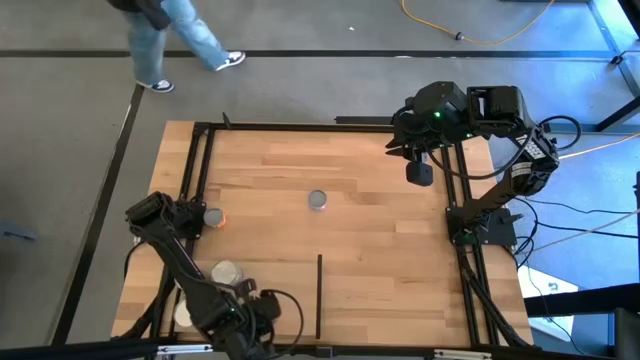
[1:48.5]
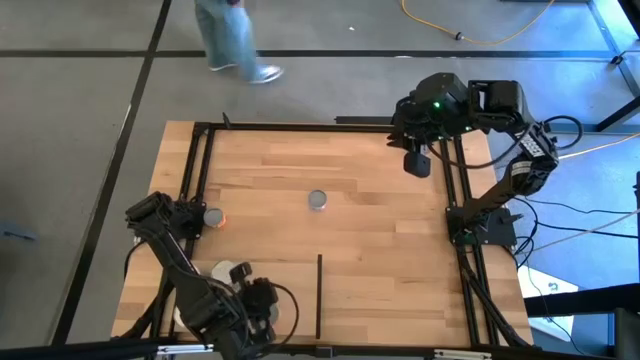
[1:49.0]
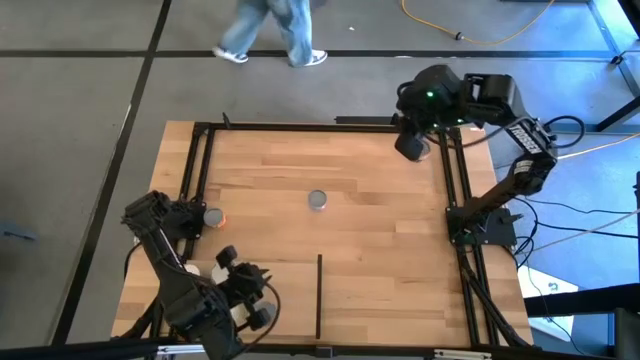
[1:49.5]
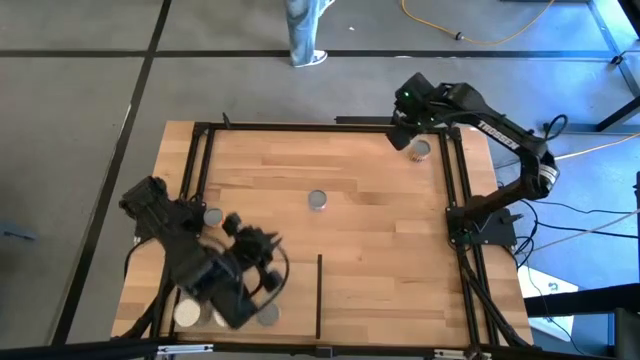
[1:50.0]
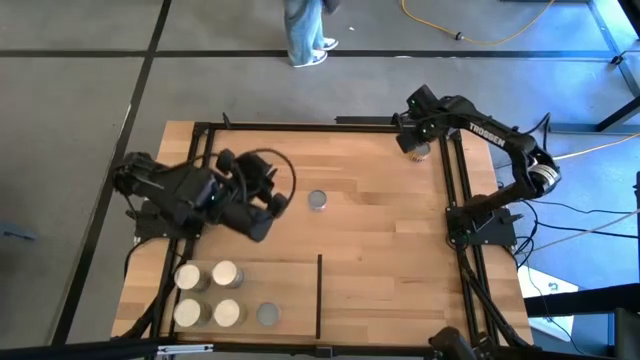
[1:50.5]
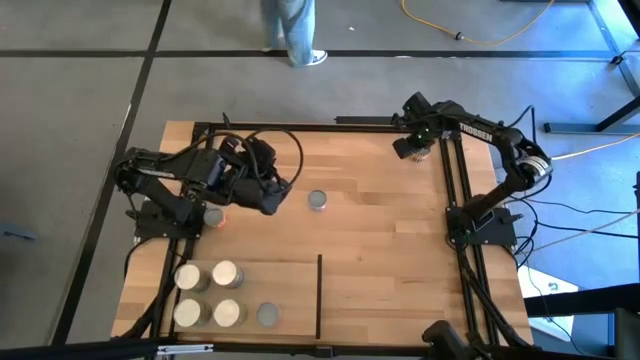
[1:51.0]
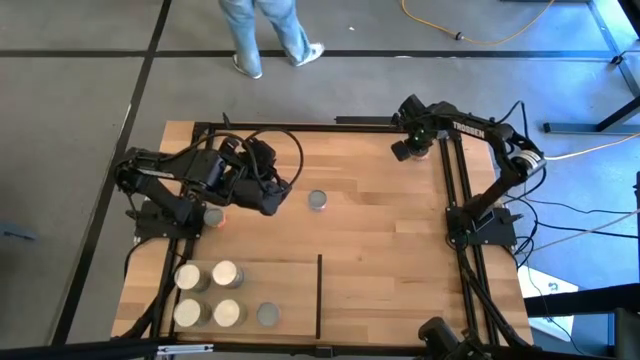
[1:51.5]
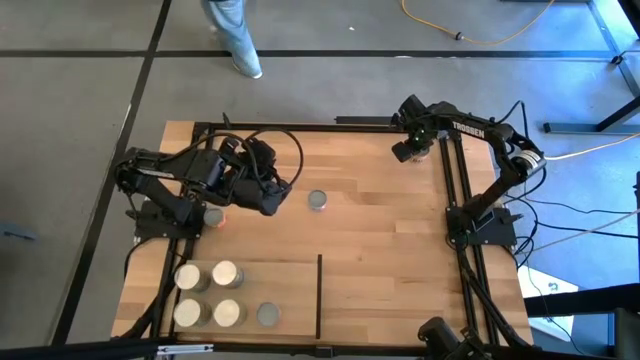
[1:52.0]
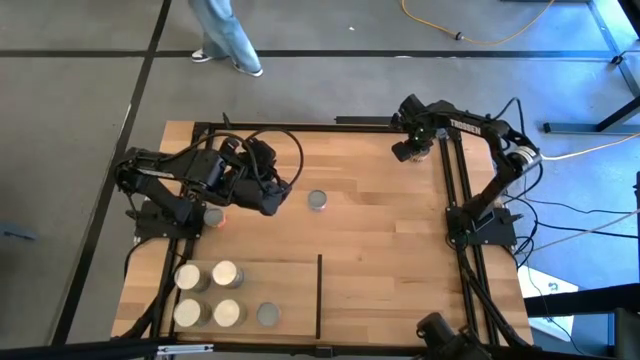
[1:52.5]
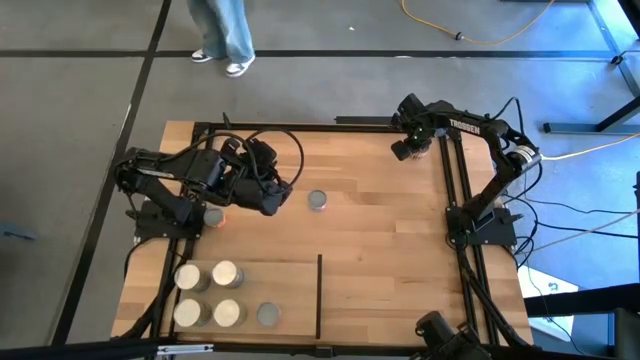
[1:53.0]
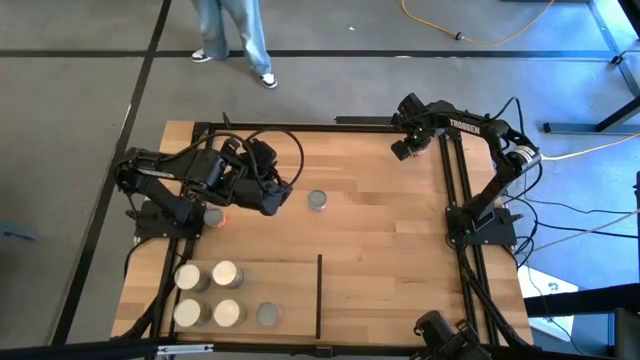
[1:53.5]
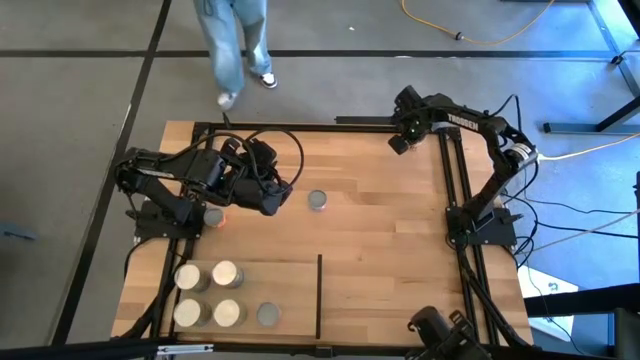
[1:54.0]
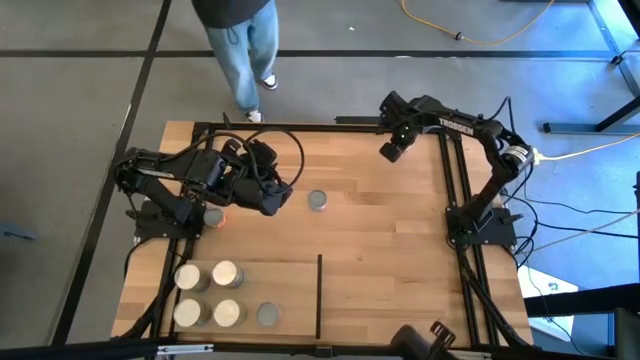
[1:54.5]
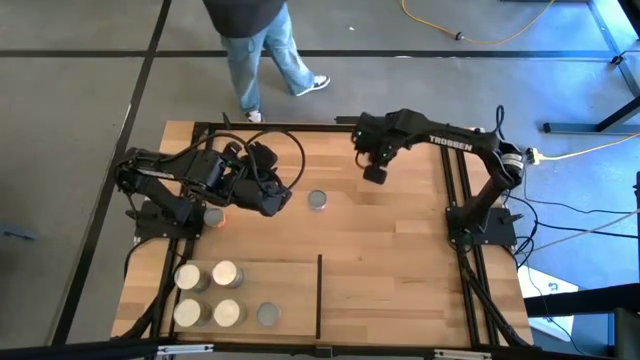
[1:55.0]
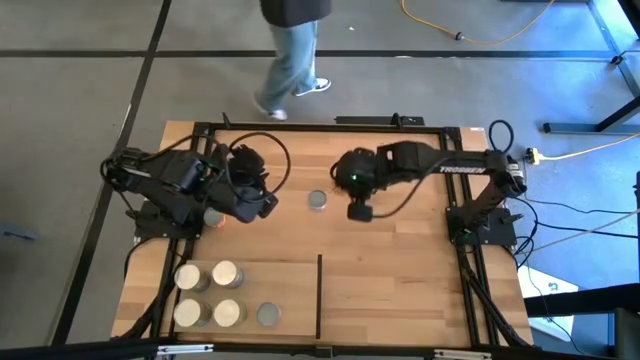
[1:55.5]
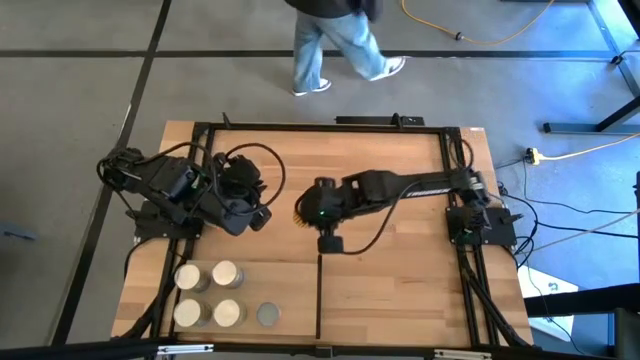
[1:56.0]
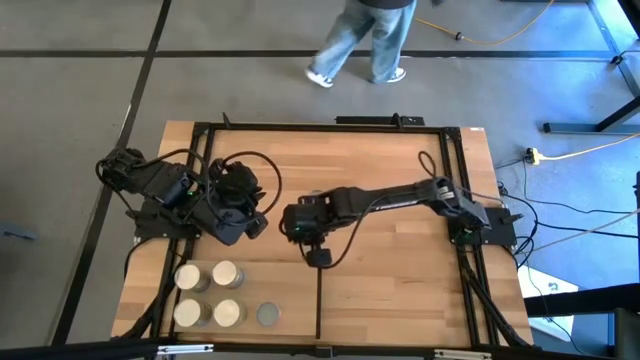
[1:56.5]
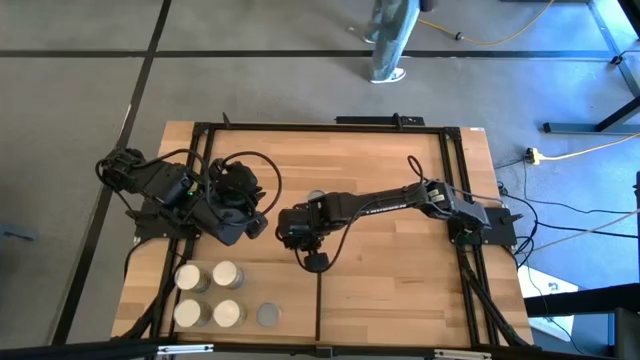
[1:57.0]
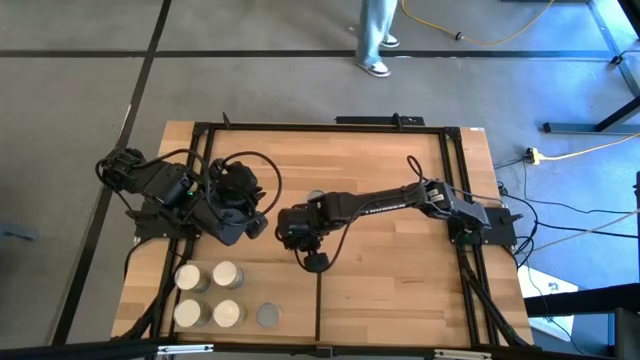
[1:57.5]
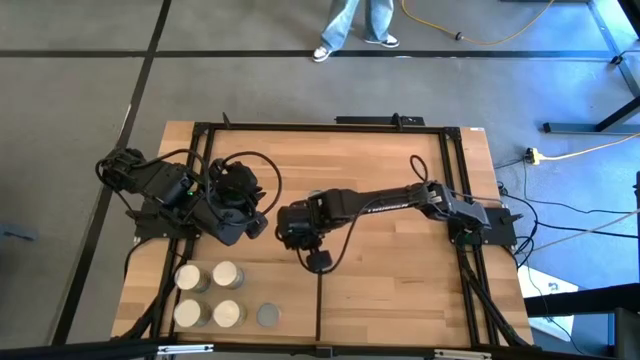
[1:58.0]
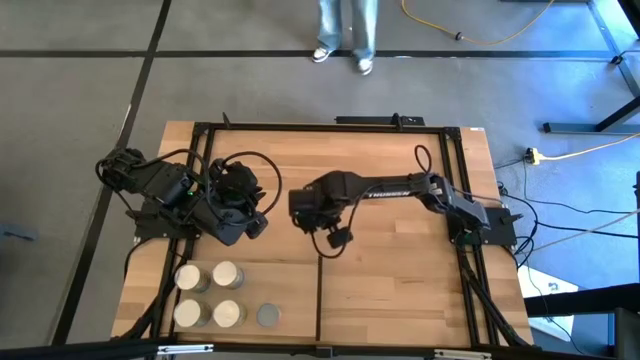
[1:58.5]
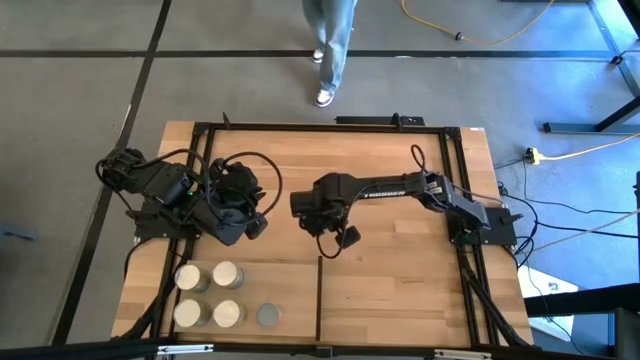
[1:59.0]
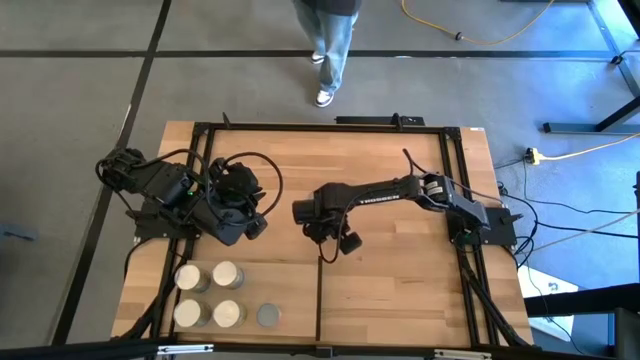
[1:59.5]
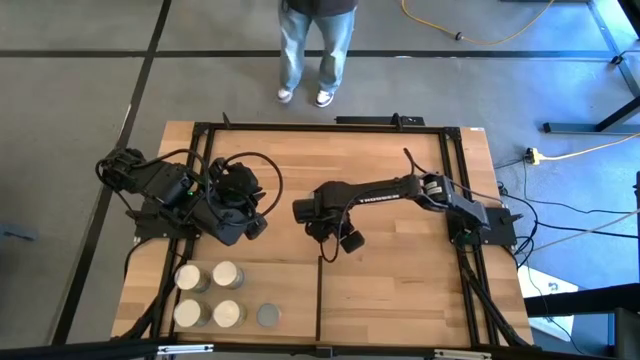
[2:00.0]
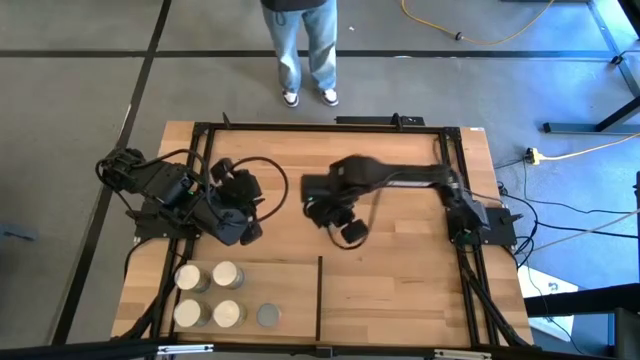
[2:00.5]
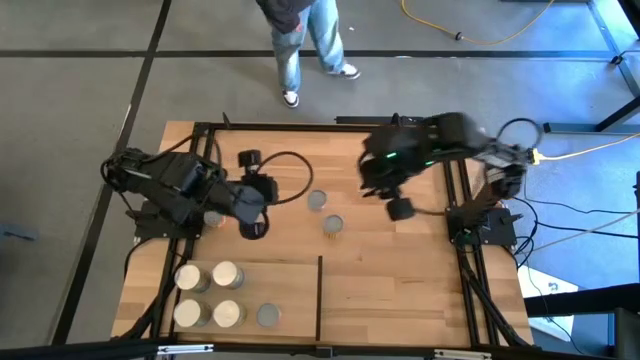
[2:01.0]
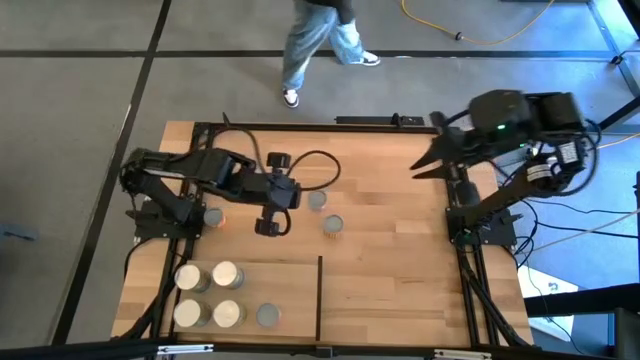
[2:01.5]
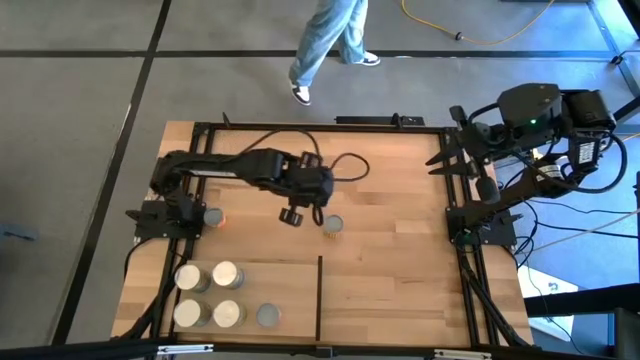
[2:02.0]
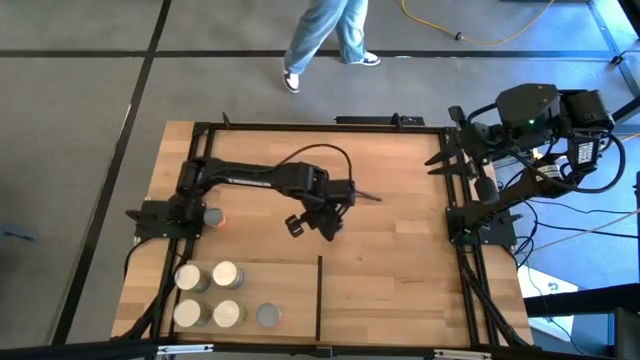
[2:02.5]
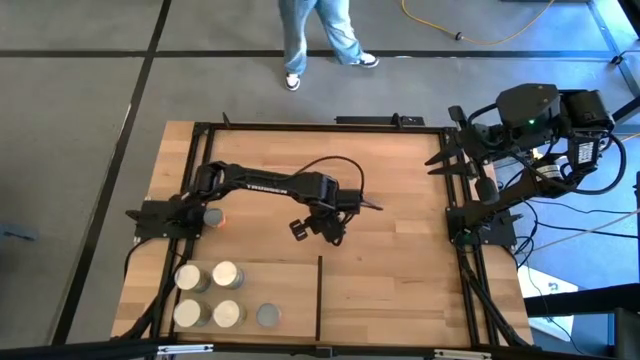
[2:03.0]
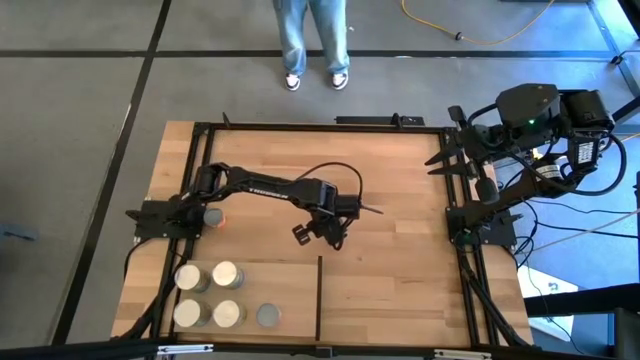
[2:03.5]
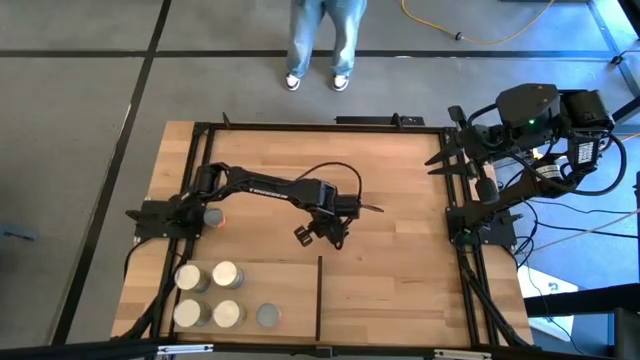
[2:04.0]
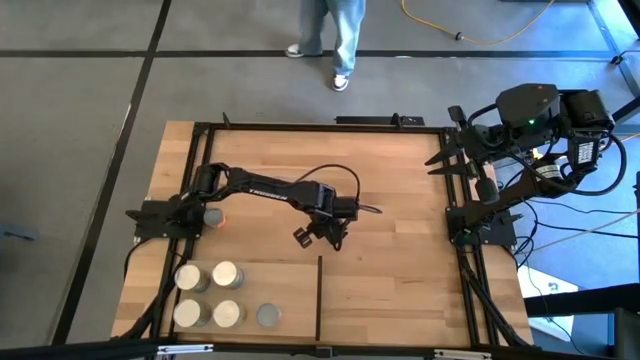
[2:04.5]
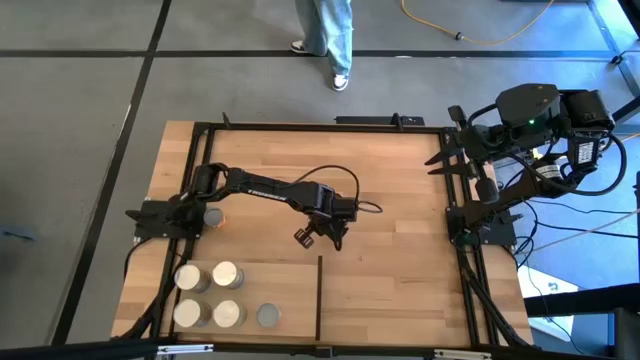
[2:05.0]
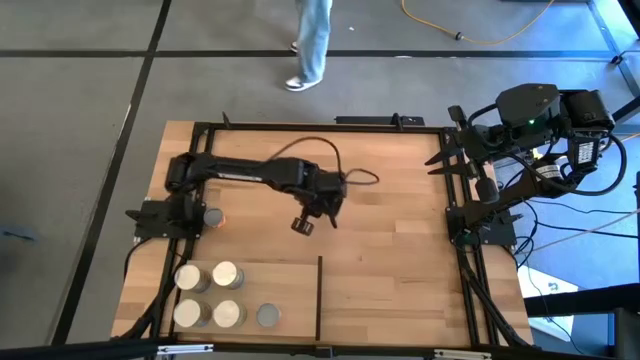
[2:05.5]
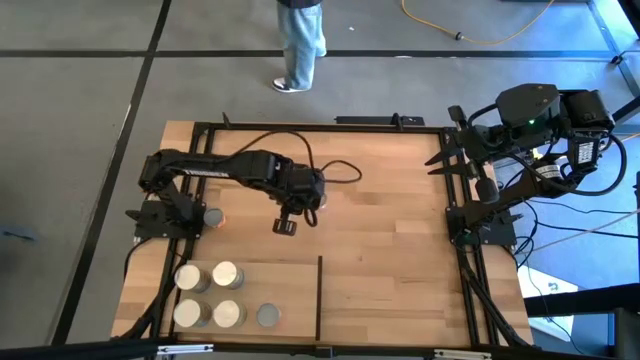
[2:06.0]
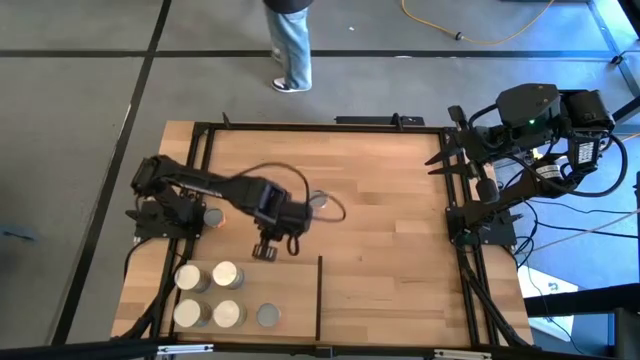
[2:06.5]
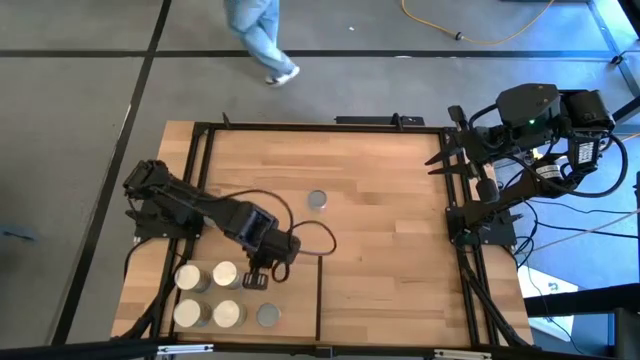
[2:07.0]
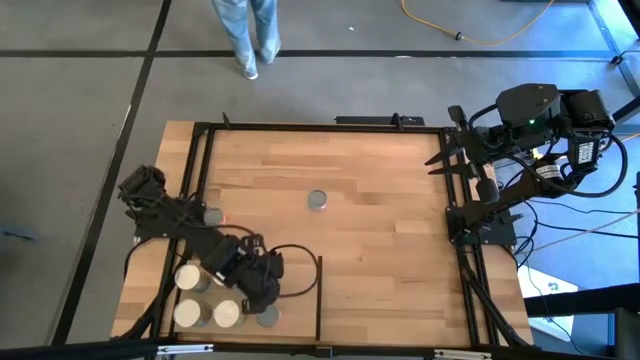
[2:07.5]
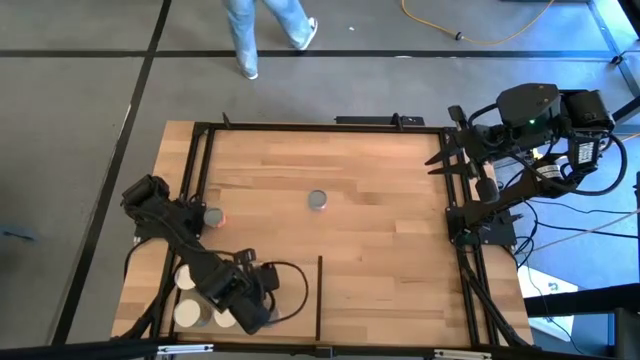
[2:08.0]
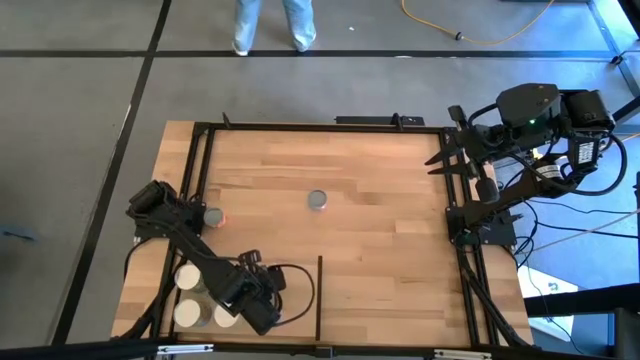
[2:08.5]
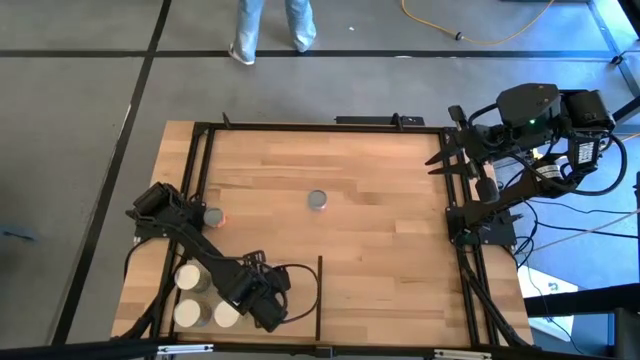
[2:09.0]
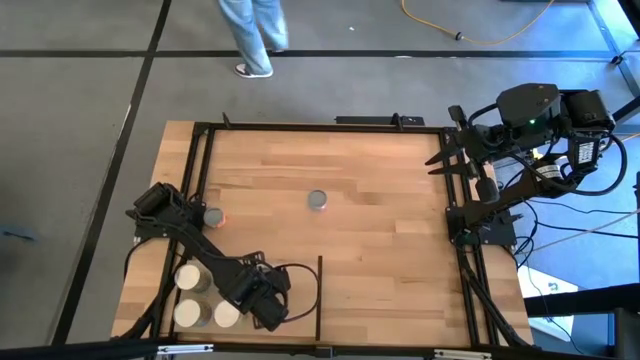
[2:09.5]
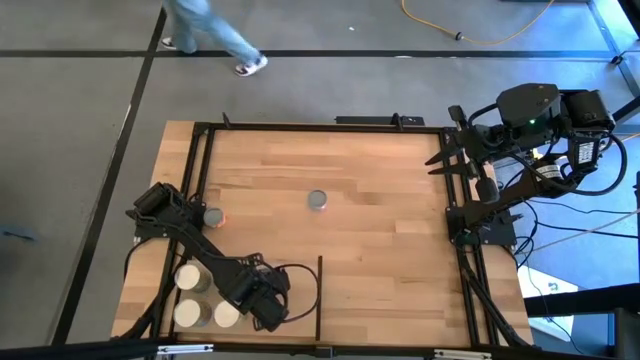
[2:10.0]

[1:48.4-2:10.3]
Task: Pick and place cans onto a shelf
Put the canned black beans on the shelf
